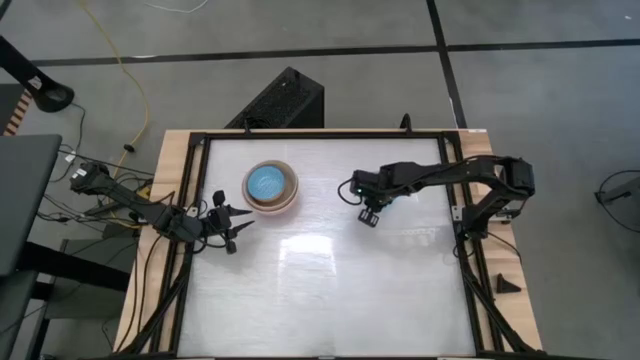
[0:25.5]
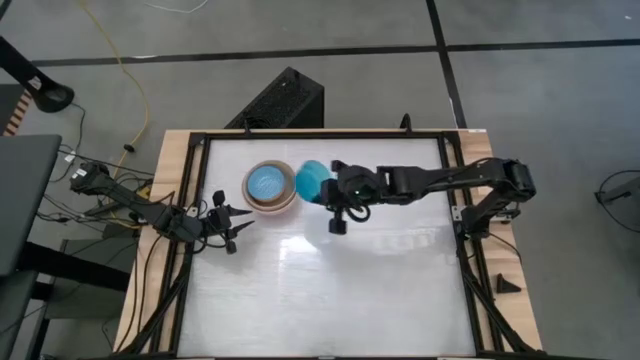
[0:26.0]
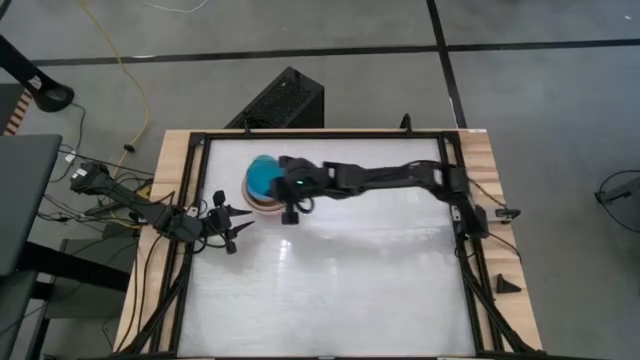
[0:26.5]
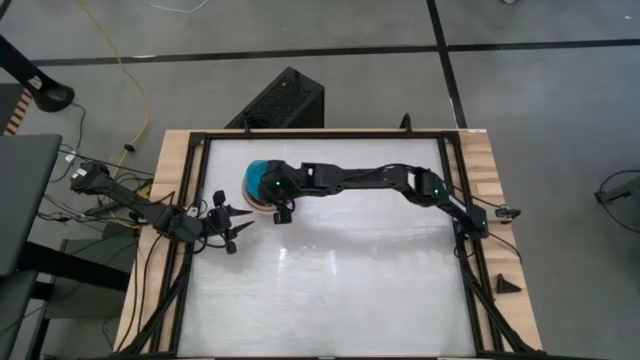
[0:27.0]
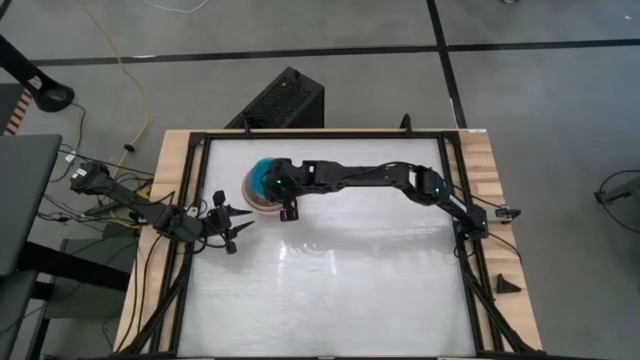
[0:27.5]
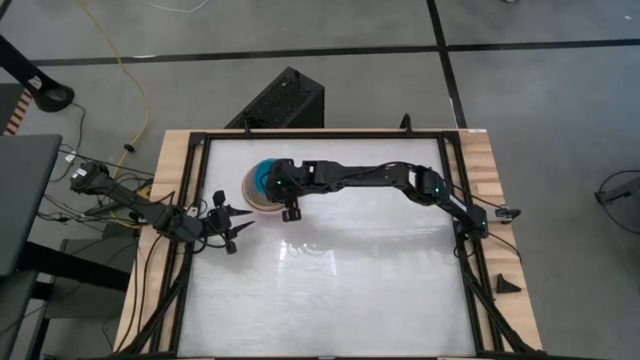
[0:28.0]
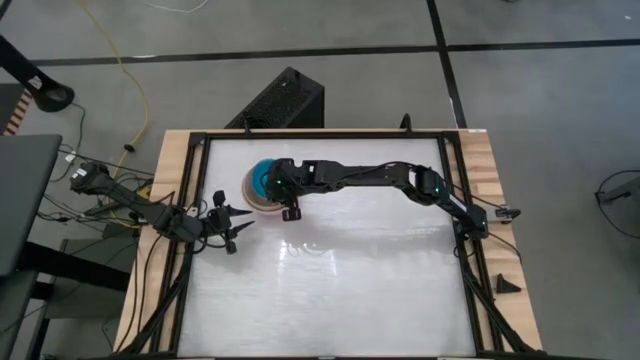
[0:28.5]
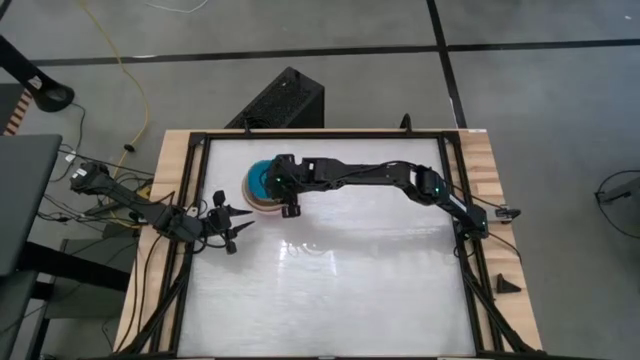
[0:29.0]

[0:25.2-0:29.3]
Stack the light blue bowl into the white and blue bowl

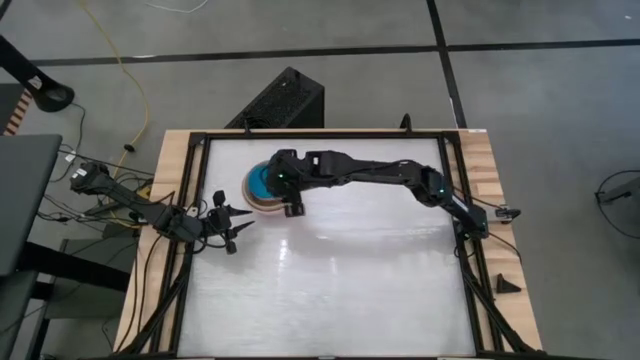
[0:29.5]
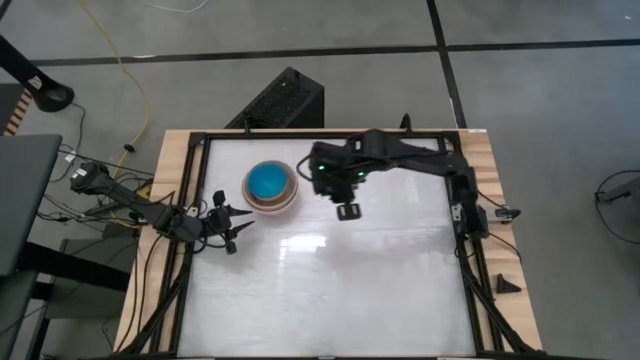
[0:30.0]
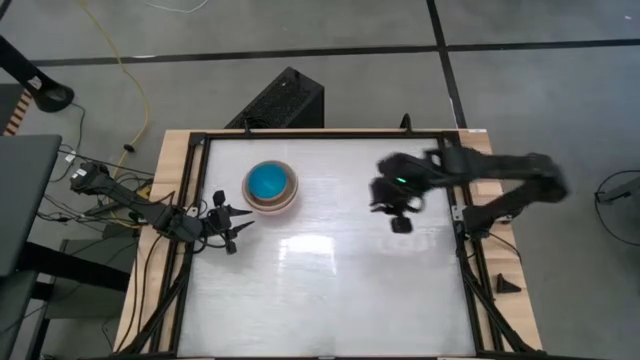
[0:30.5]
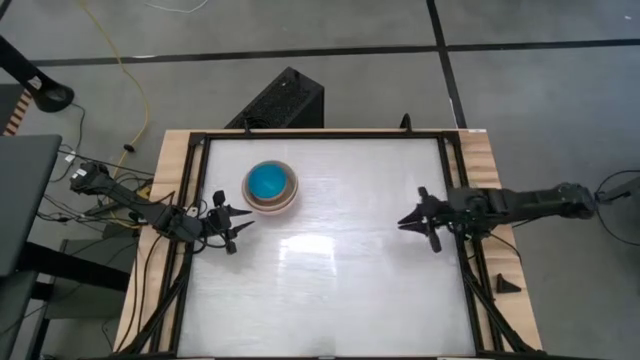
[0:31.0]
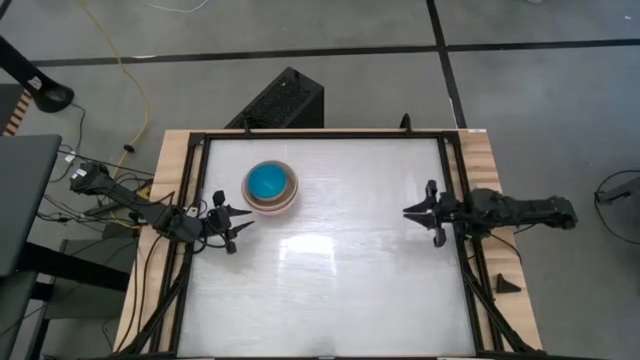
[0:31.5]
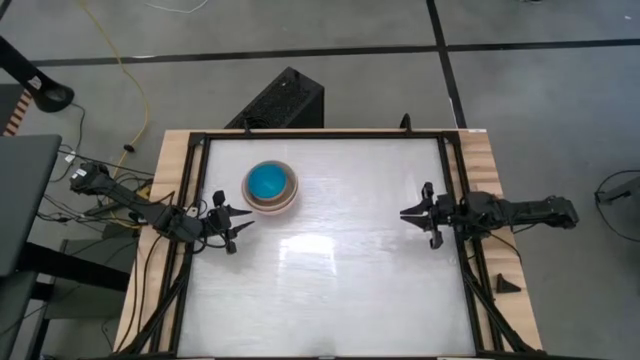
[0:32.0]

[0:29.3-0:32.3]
Return to Home Position

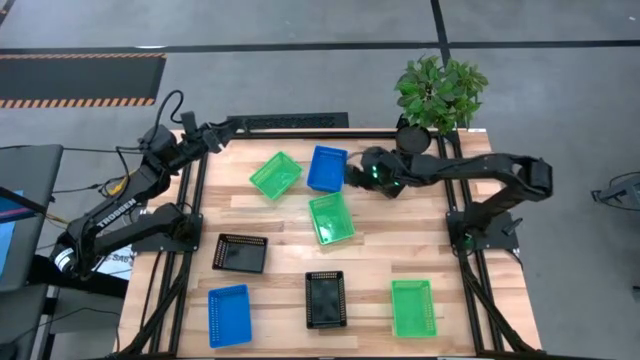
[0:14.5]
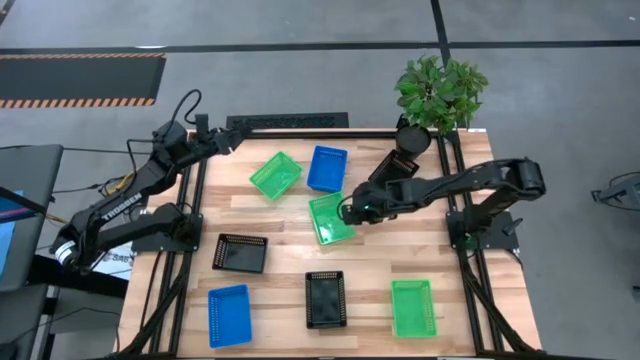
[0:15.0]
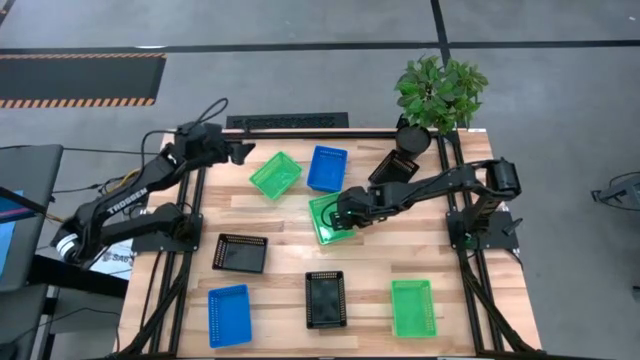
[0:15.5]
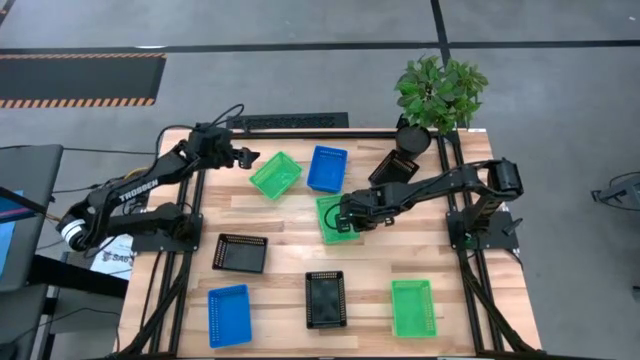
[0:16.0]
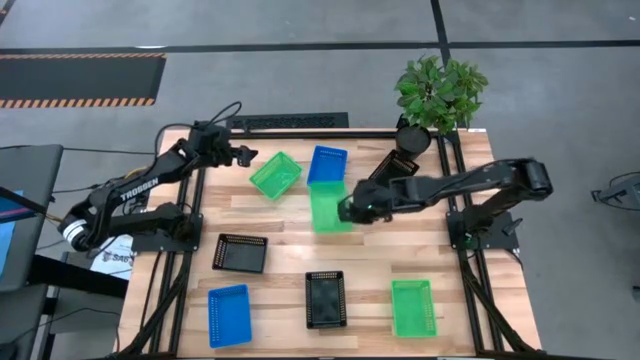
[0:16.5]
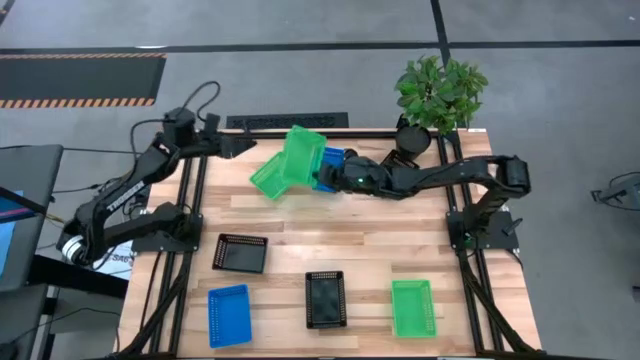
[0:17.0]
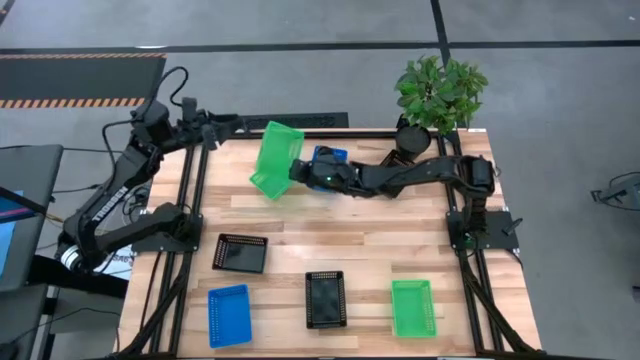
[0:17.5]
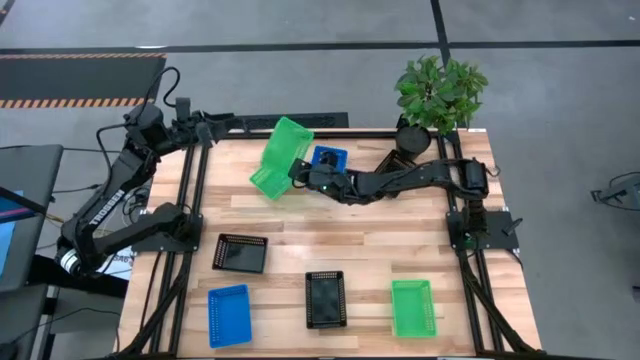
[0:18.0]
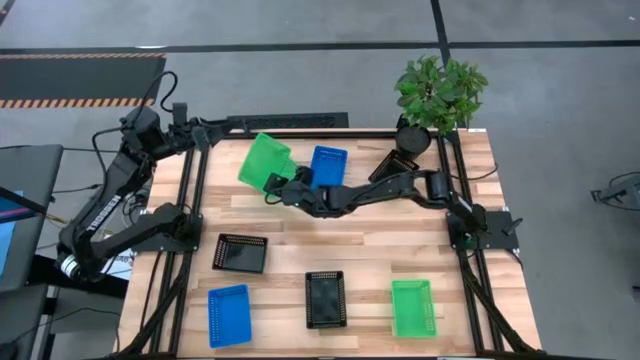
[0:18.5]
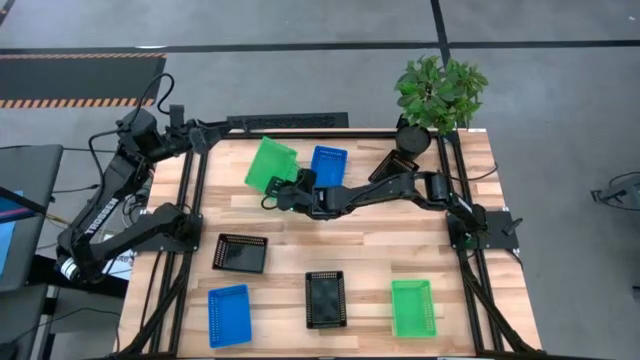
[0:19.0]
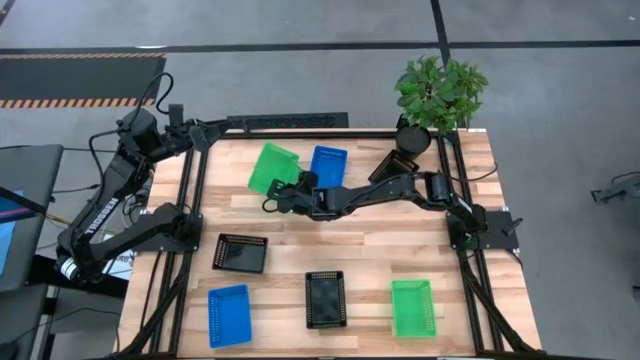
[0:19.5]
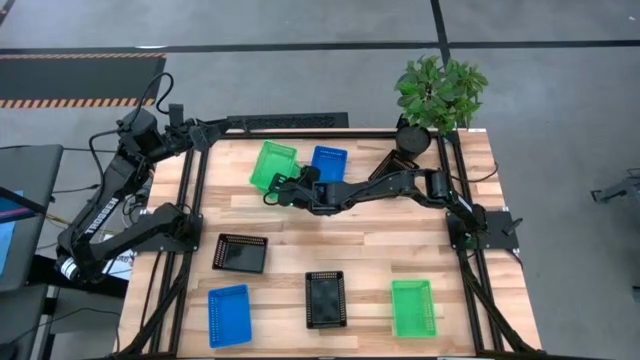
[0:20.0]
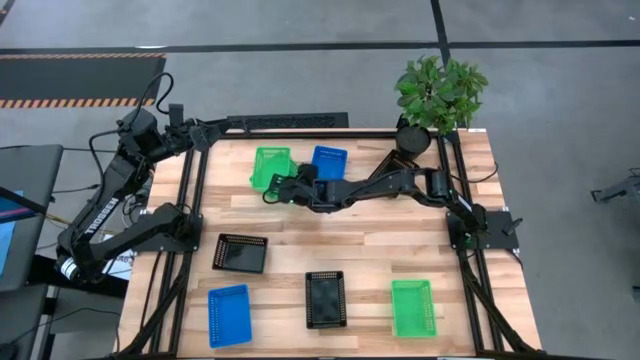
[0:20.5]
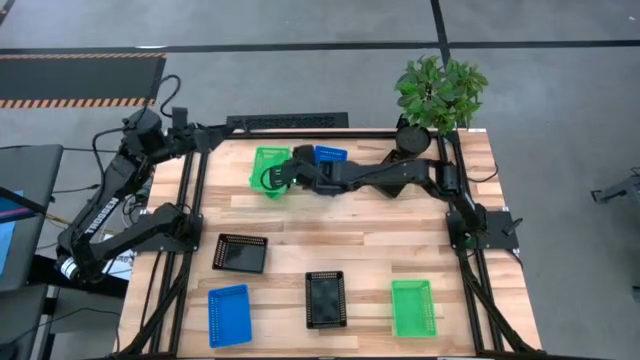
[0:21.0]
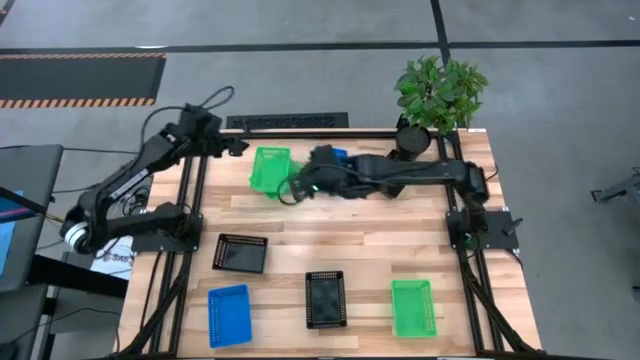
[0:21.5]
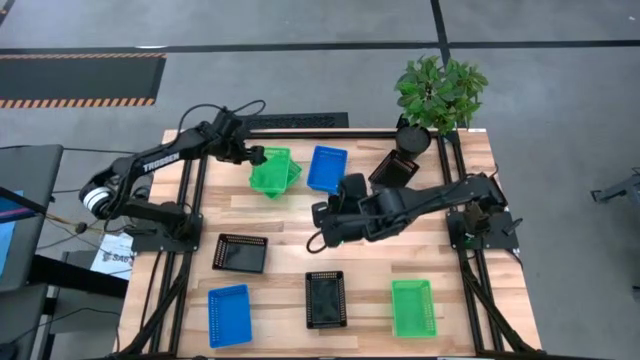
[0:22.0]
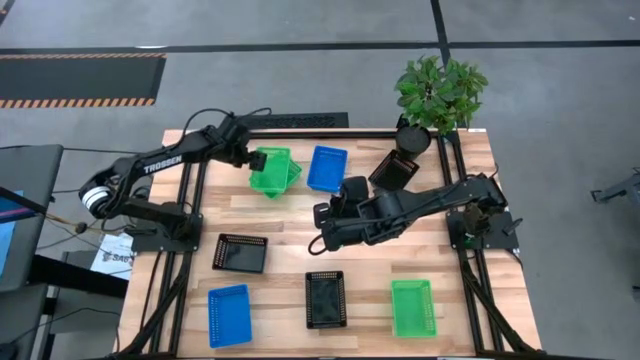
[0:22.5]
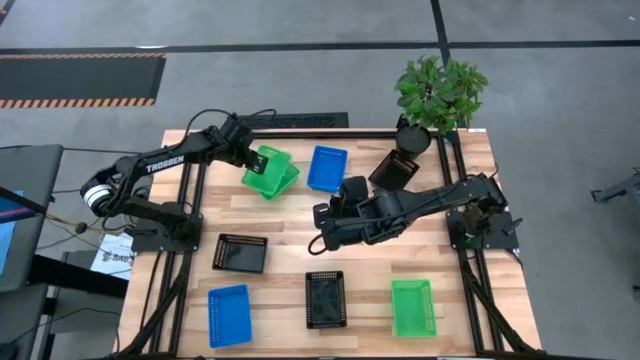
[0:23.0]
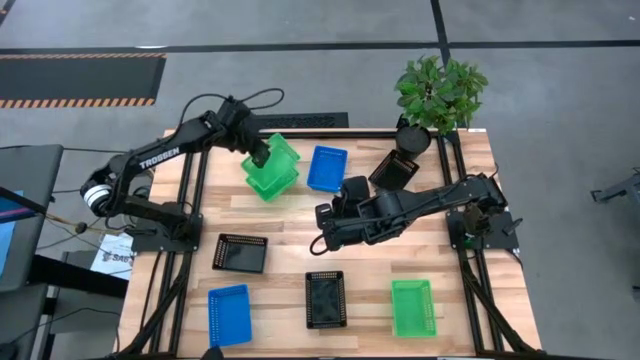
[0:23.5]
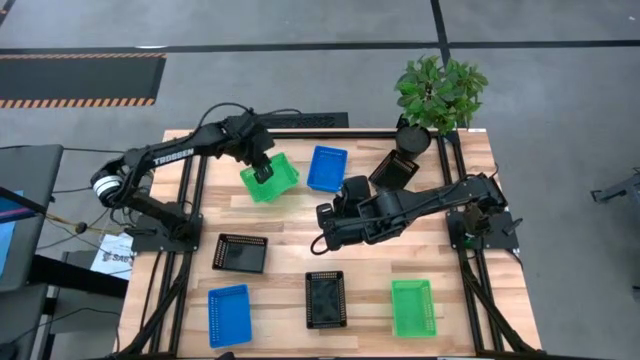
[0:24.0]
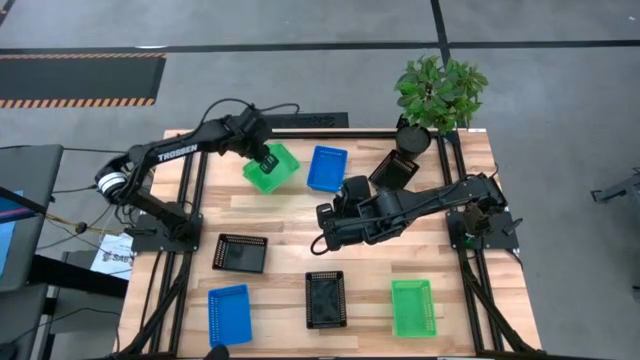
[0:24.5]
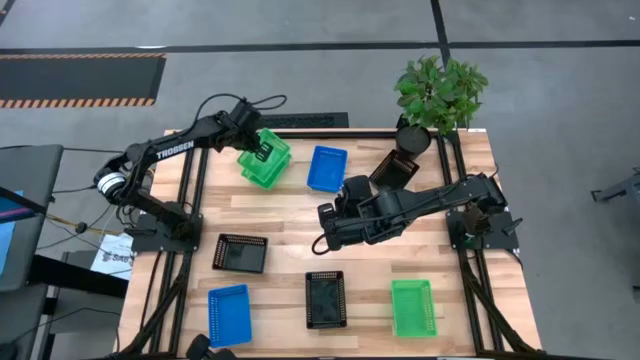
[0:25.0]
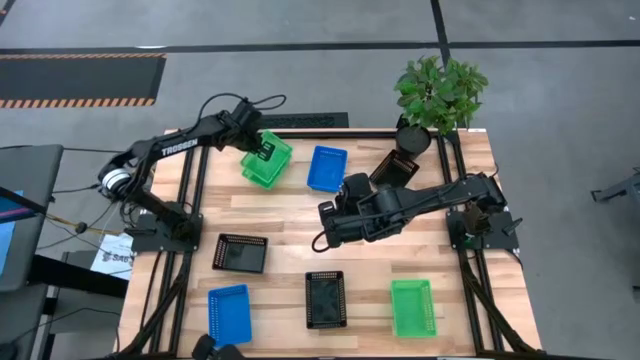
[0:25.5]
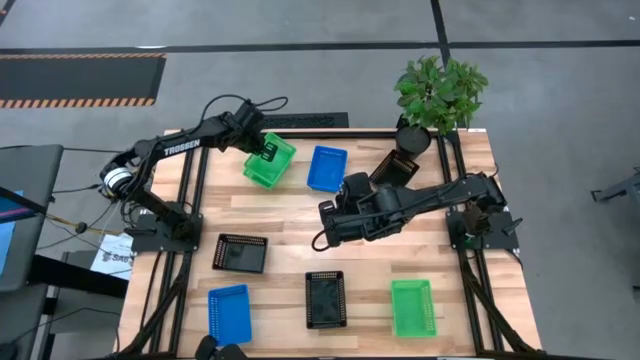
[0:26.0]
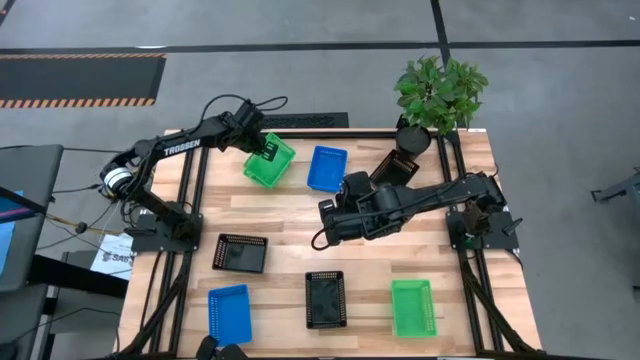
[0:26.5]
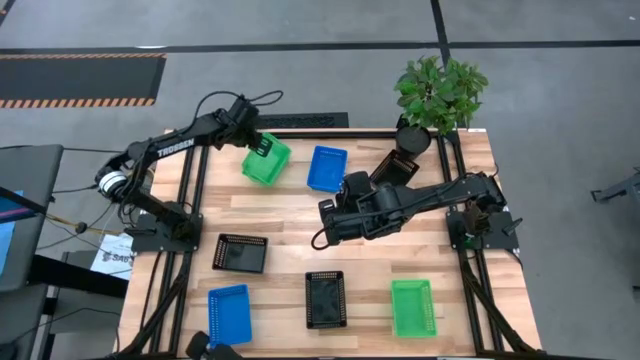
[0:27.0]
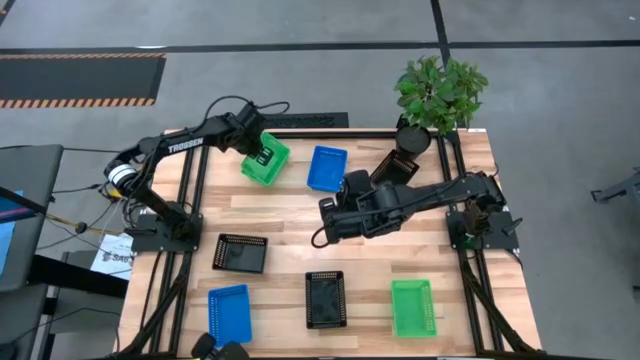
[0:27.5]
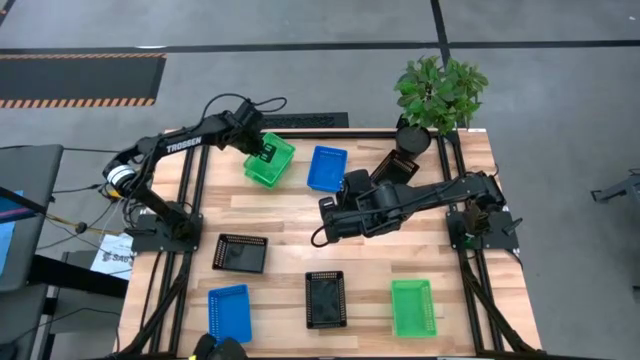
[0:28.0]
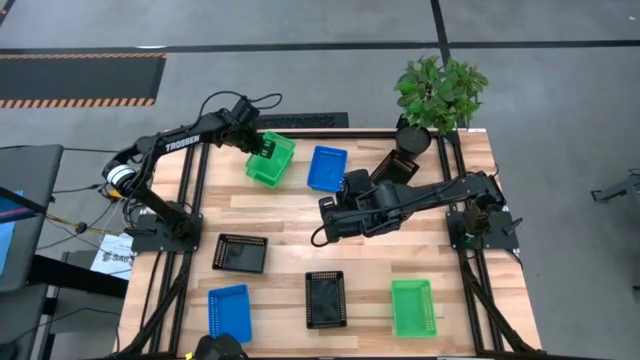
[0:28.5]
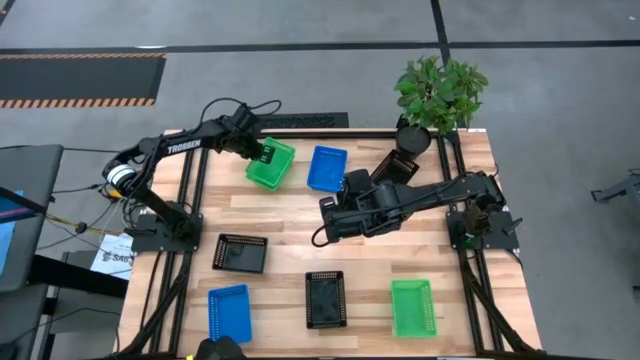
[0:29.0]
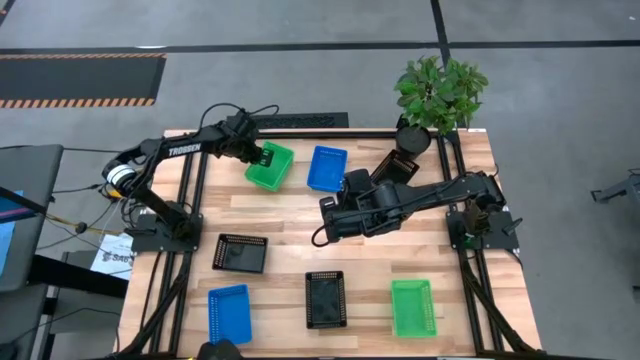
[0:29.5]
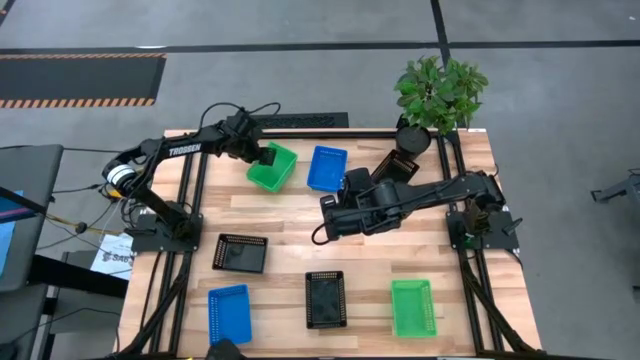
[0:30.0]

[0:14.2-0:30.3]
Stack the middle green bin on the top green bin
